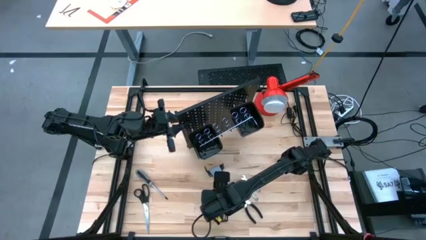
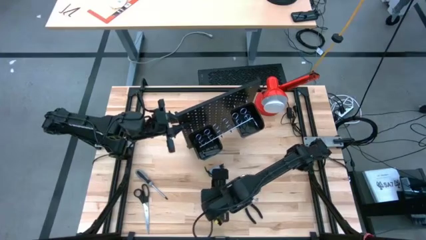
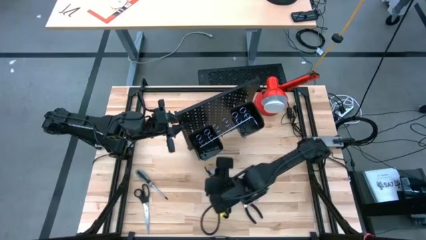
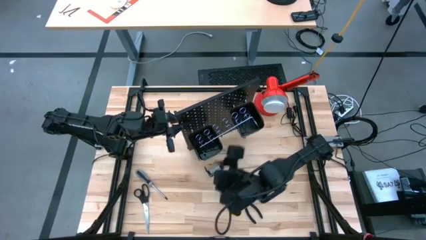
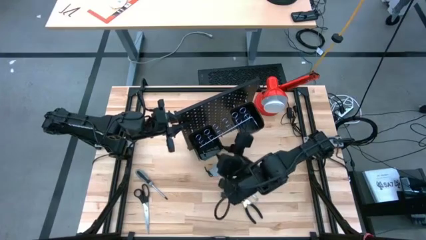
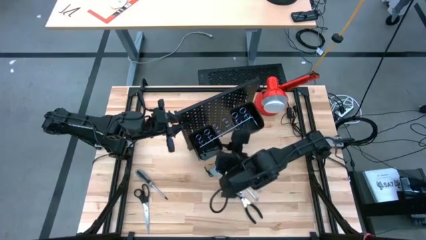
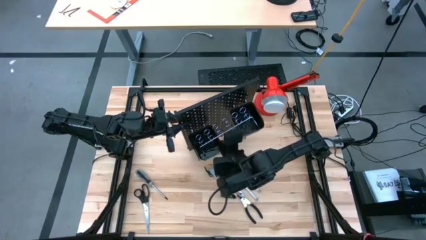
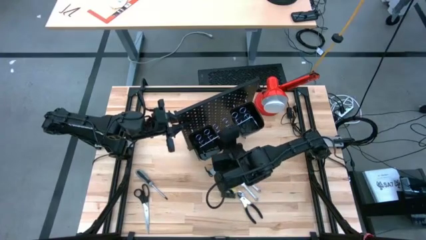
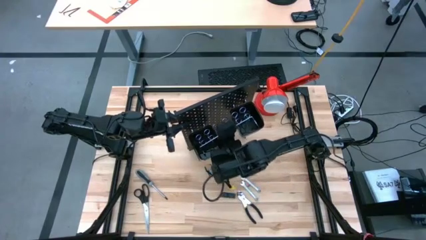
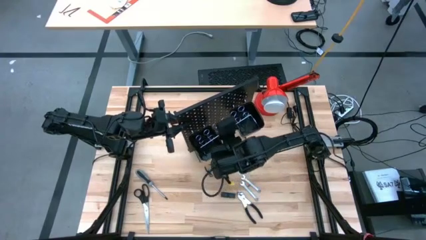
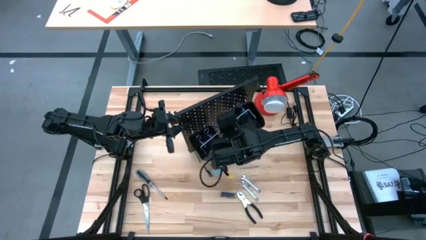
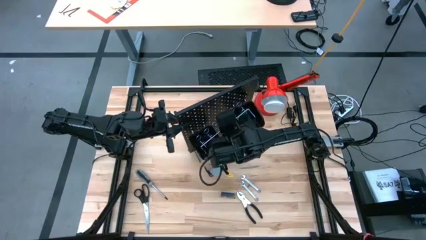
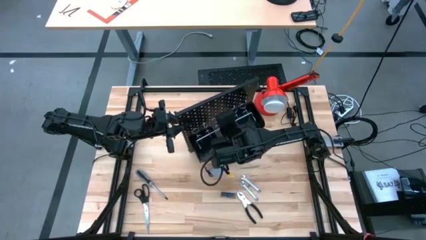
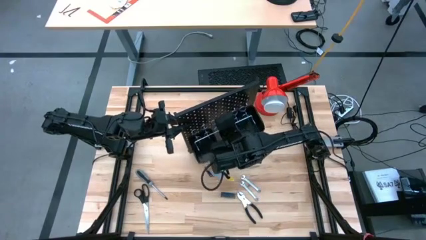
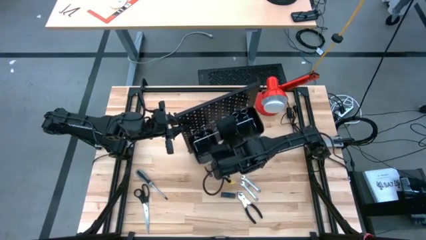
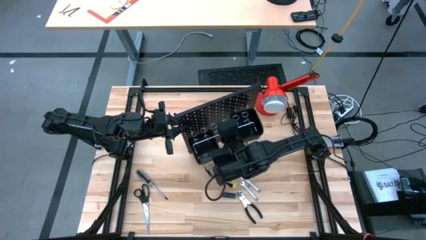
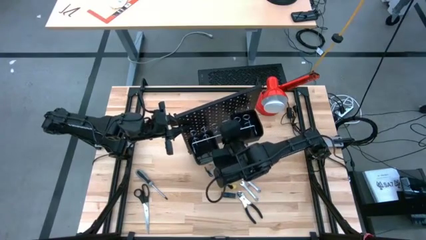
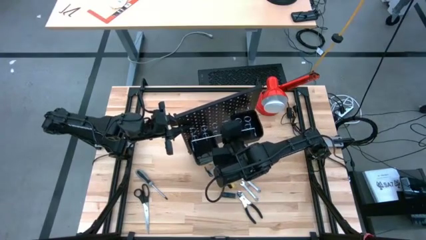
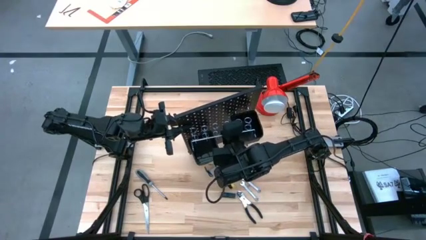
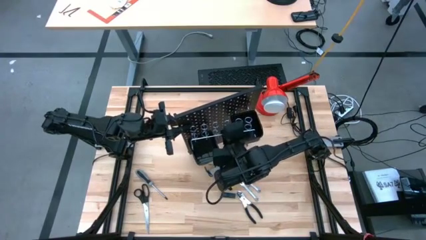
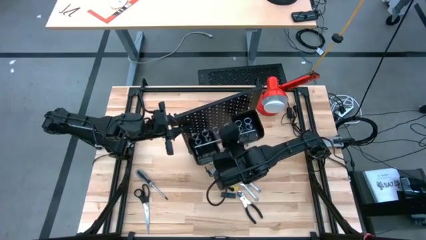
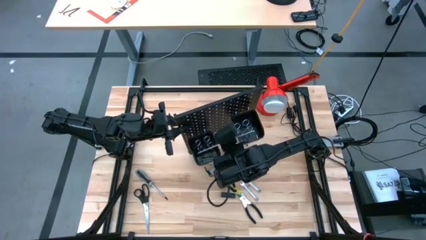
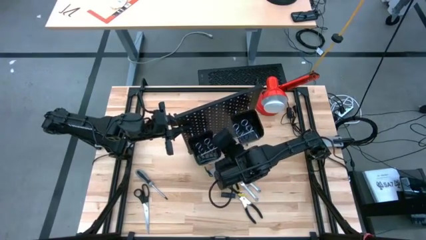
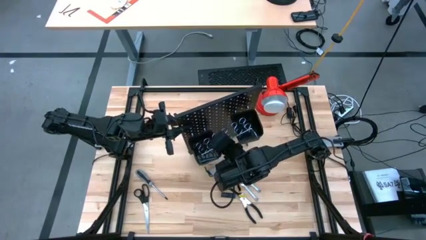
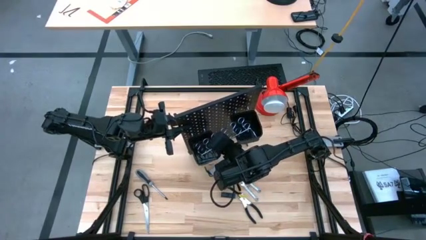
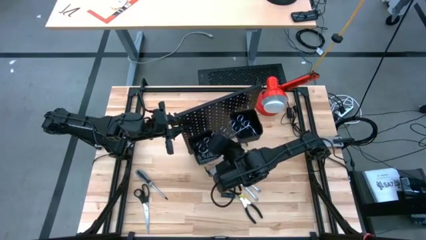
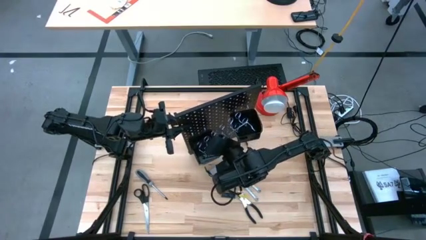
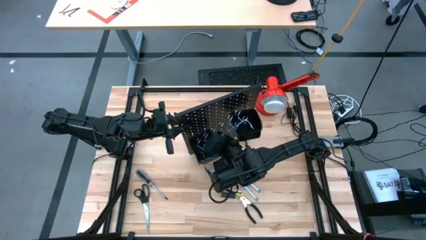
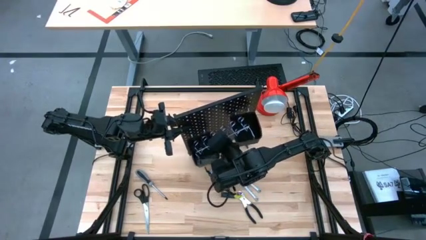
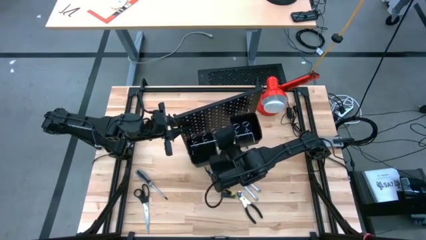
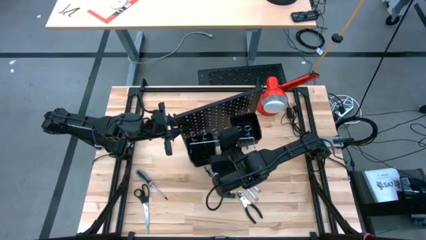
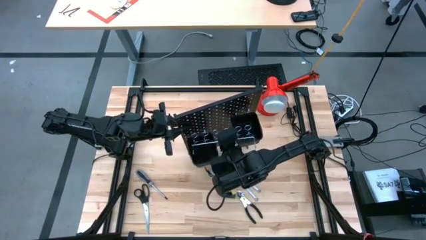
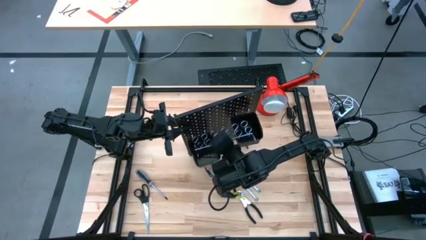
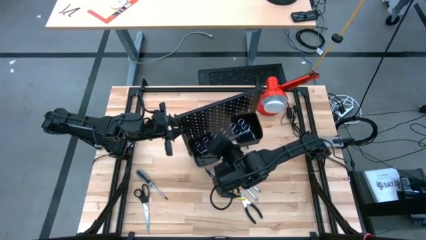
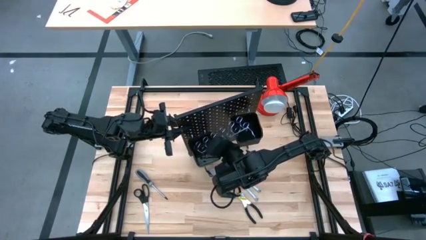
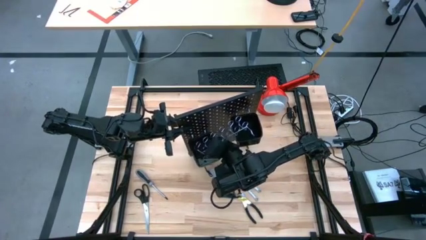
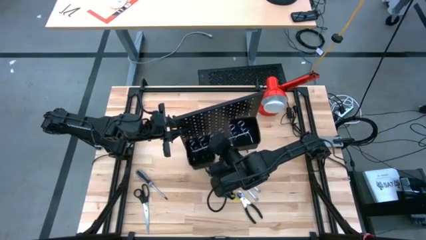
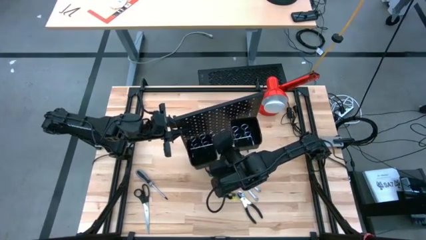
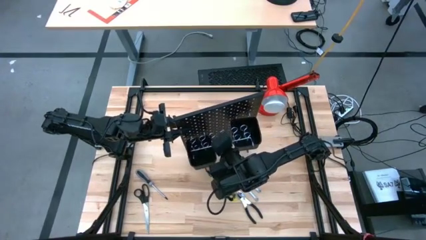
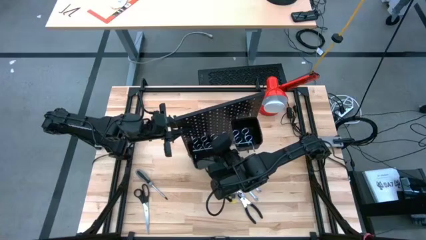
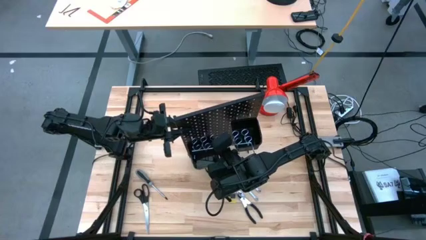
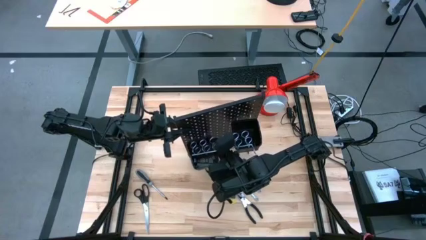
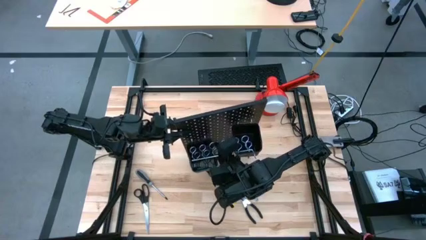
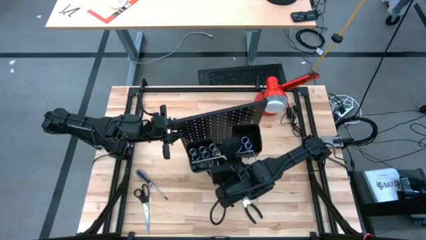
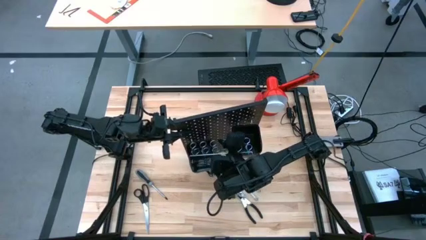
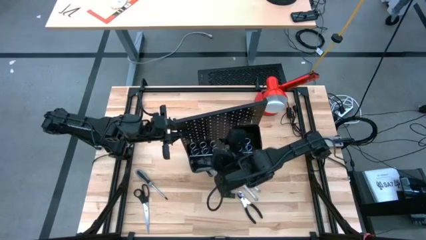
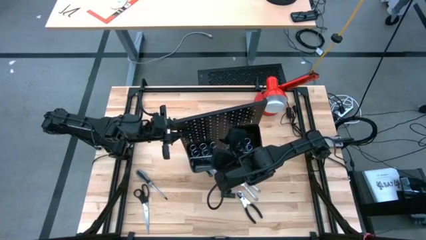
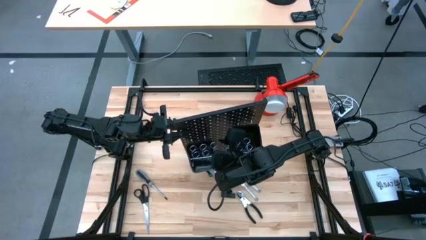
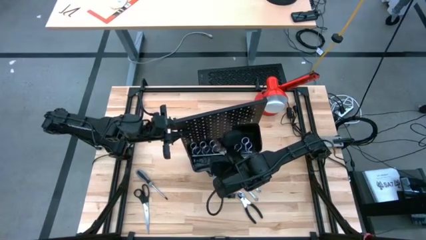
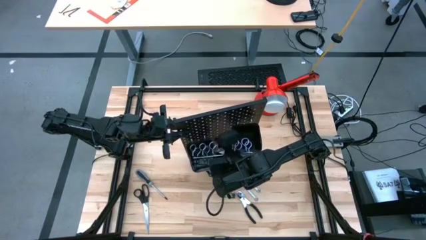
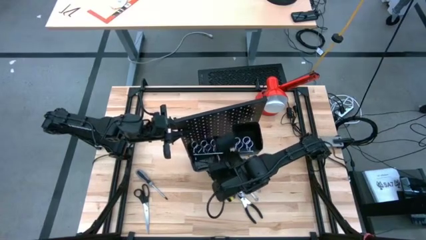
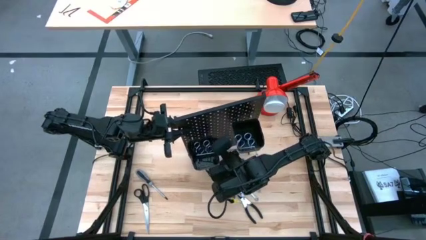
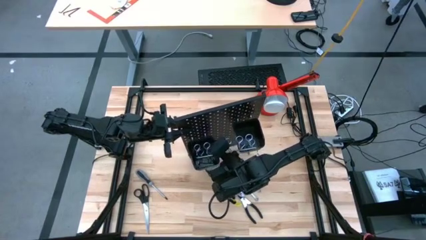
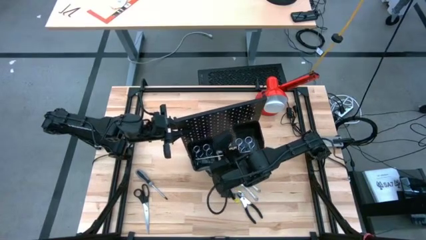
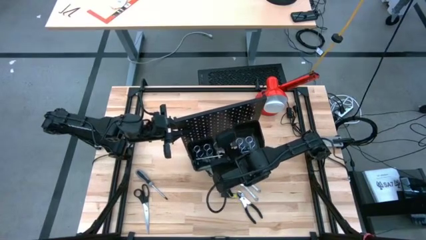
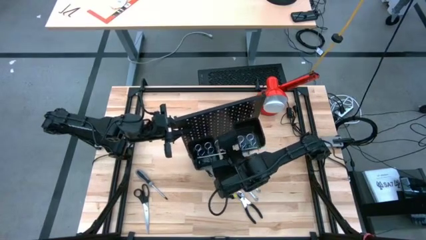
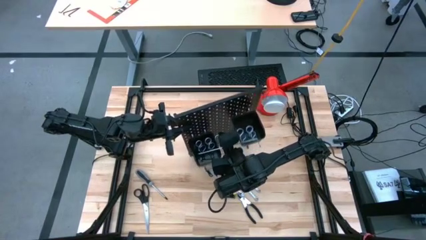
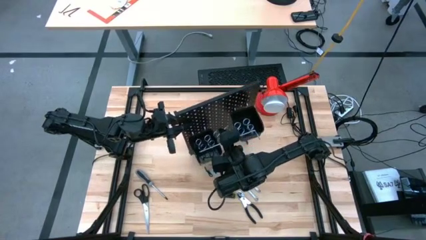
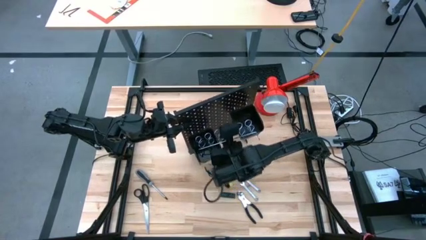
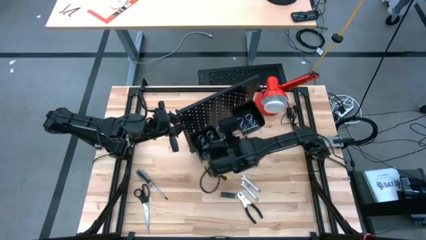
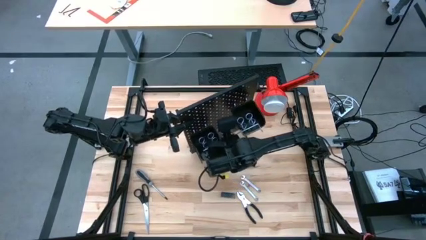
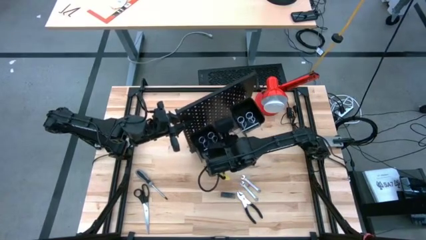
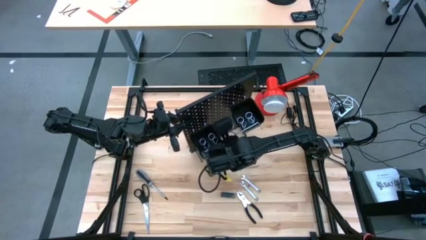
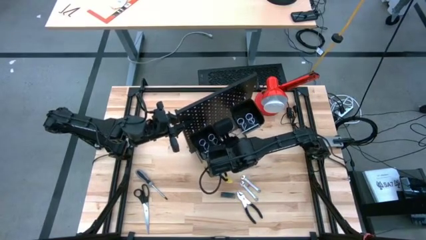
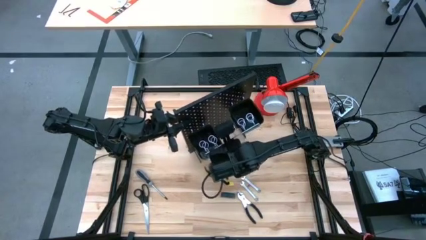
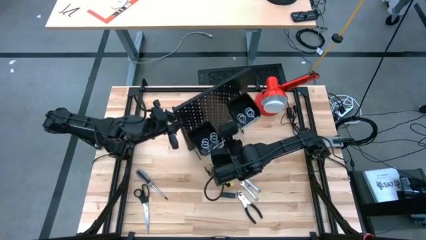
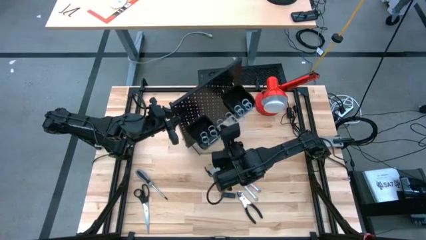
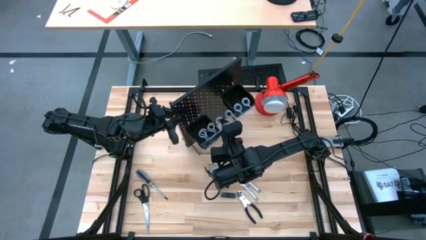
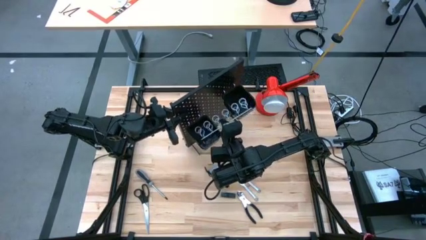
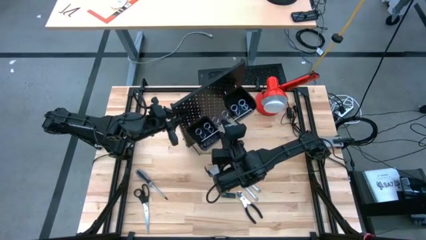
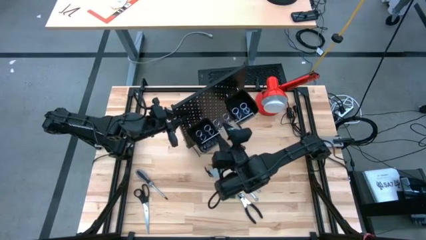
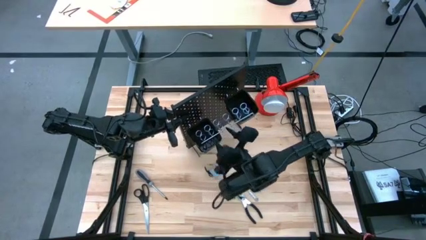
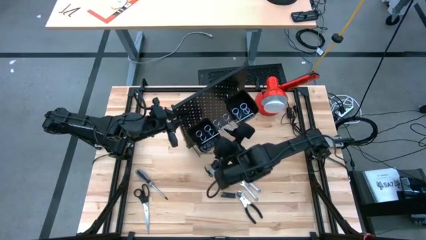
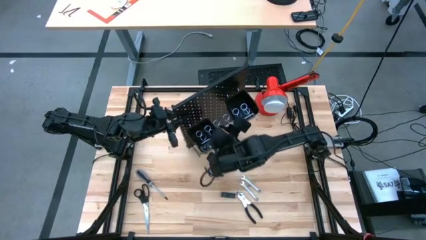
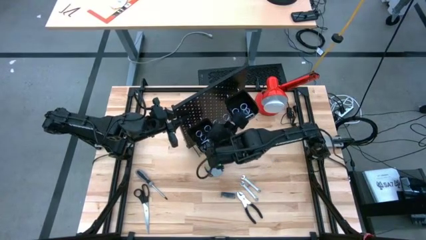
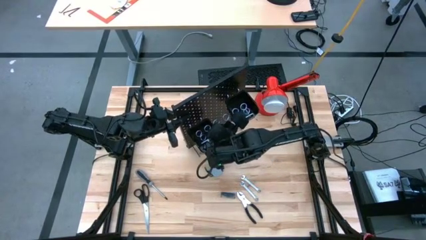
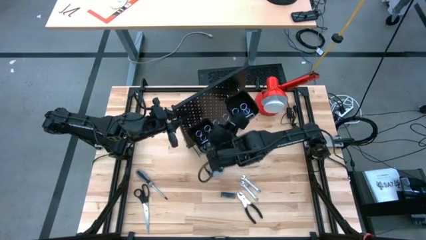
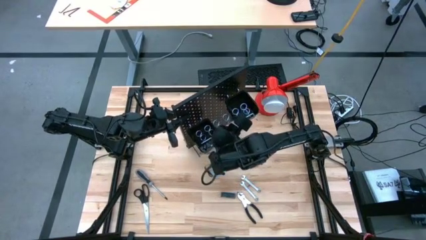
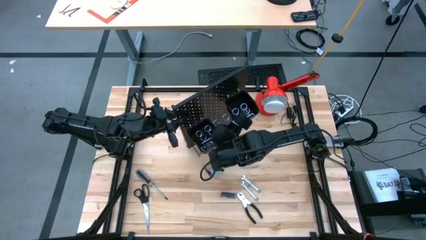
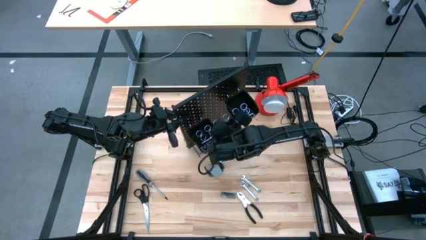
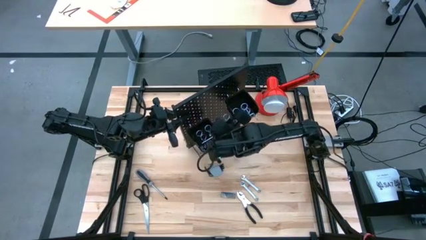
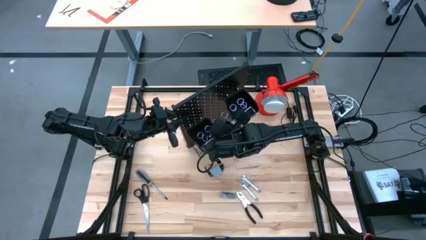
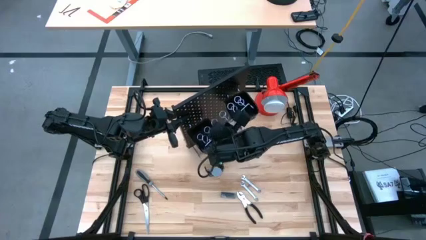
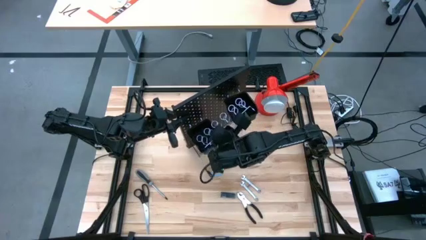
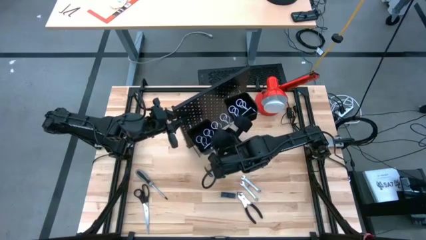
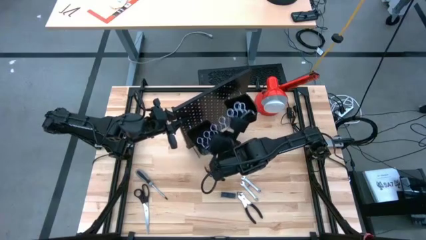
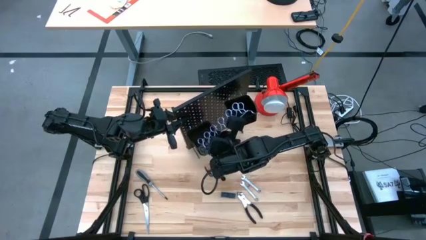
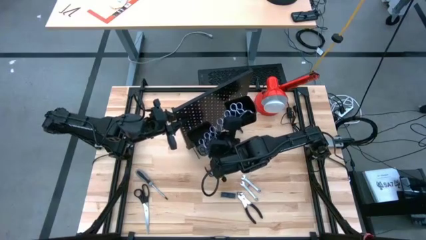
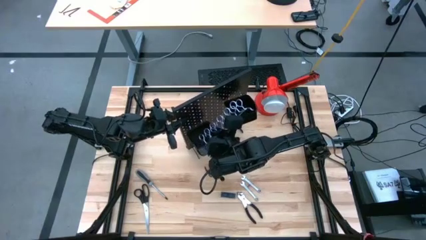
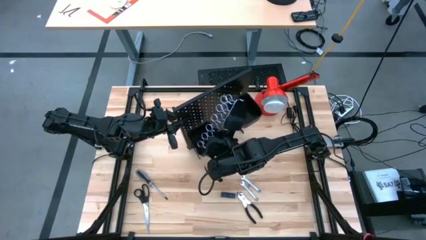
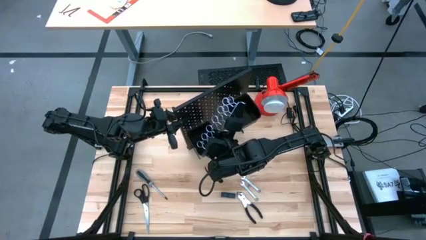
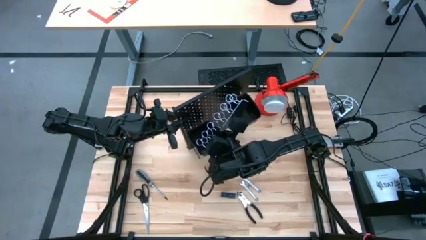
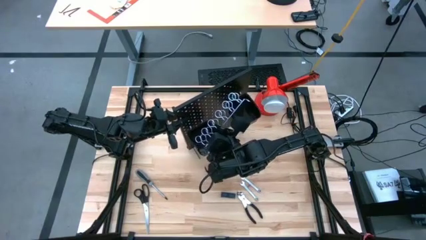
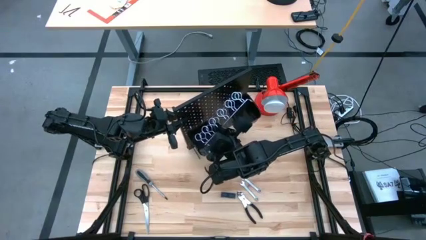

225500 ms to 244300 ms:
Task: Hang tools onto peg board
Assemble the tool holder on the pegboard
